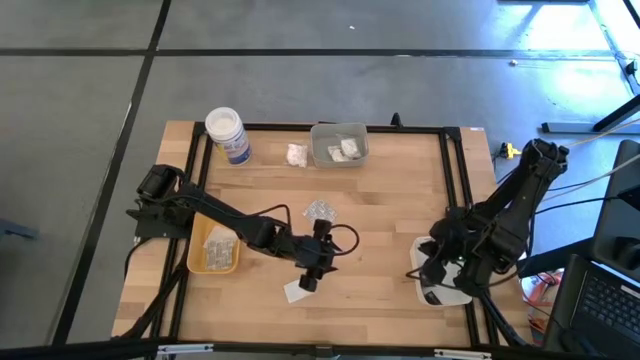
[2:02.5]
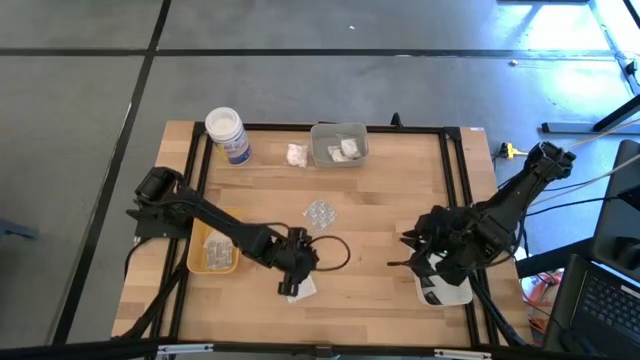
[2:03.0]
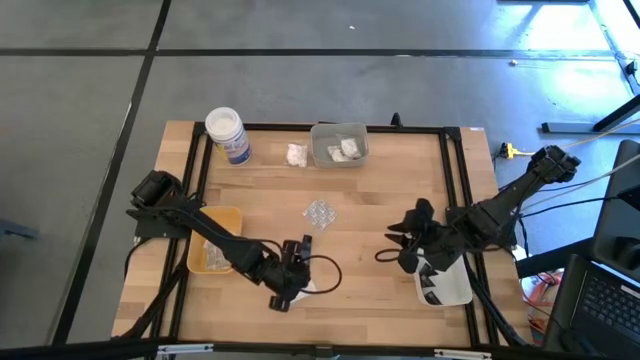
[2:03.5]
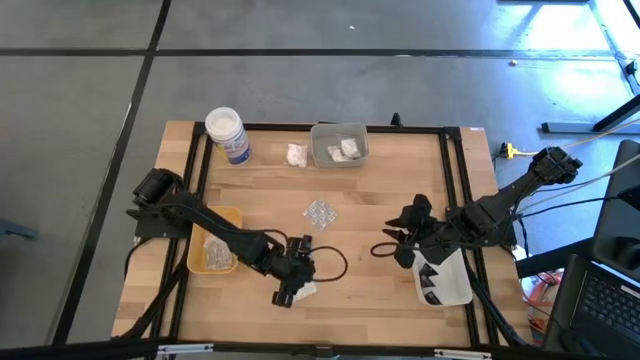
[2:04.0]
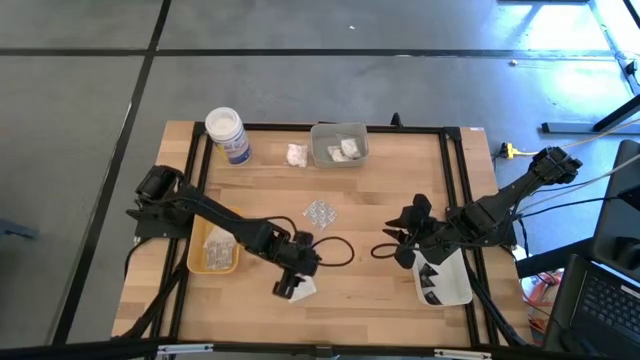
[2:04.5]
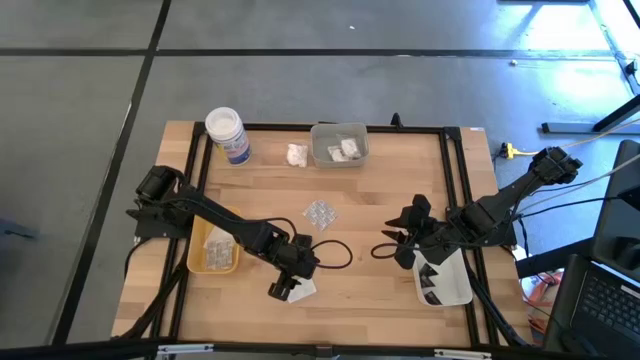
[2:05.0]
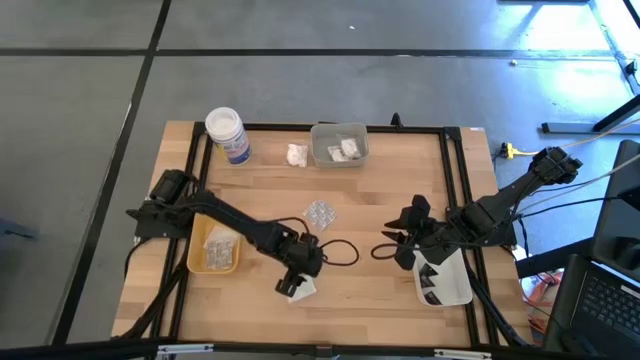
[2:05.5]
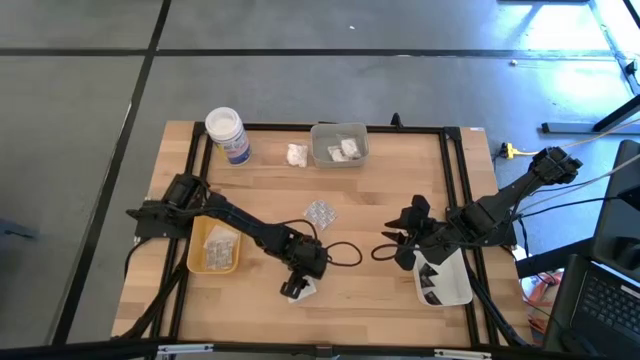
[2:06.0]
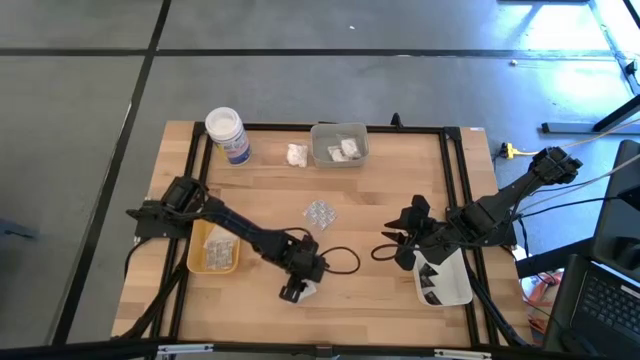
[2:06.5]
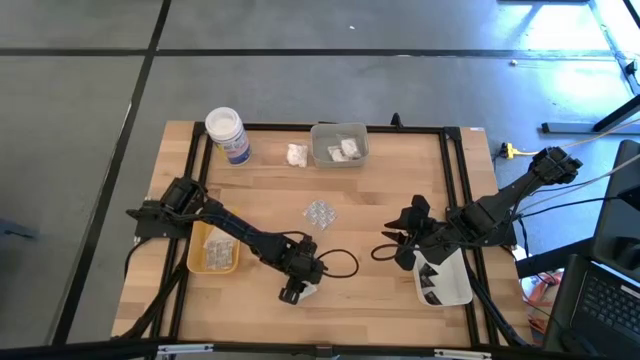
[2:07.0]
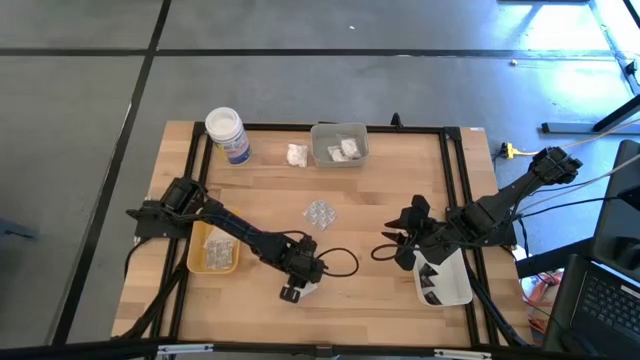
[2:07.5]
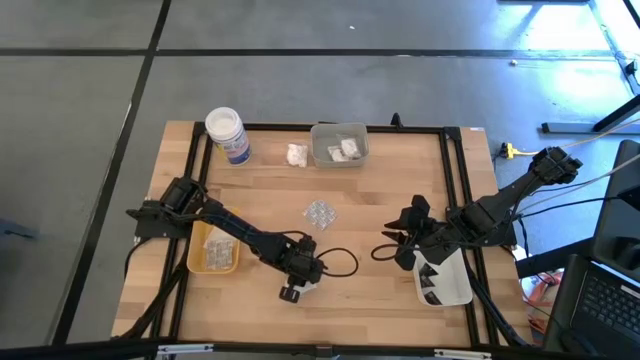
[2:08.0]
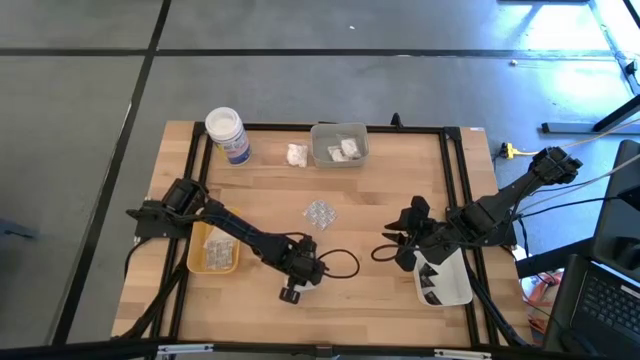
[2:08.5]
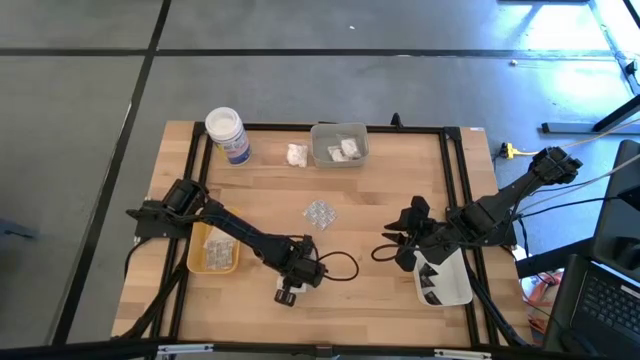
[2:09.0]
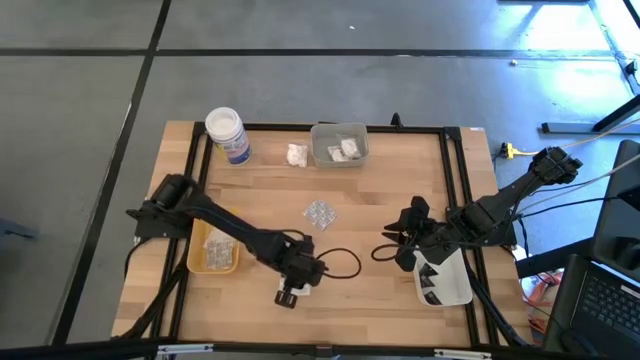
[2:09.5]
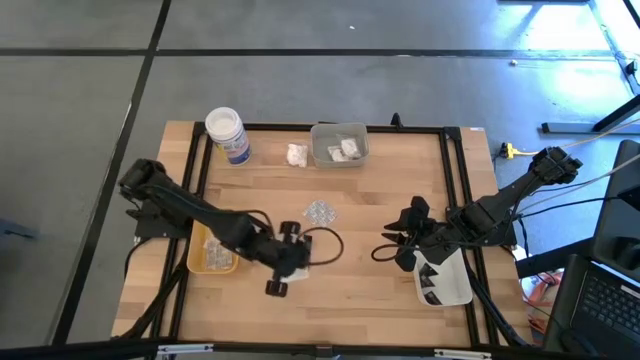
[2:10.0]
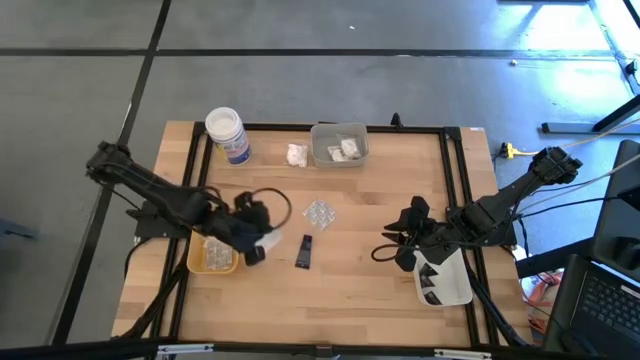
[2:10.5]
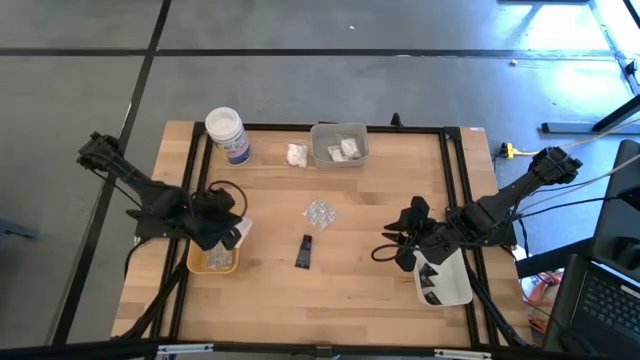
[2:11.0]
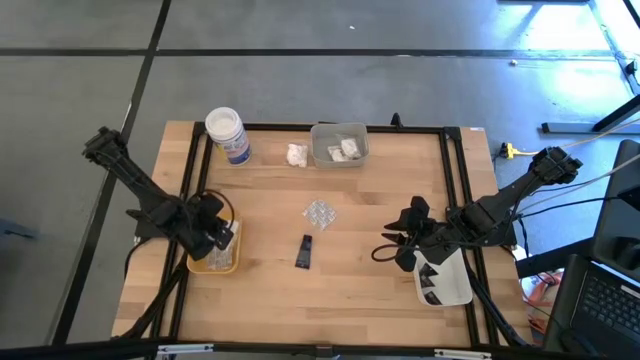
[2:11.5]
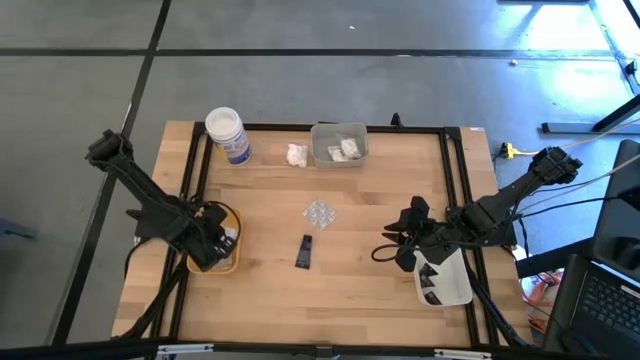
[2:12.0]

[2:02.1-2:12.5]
Task: Pick & Place Travel size toiletries
Put the white bandage pack into the yellow bin

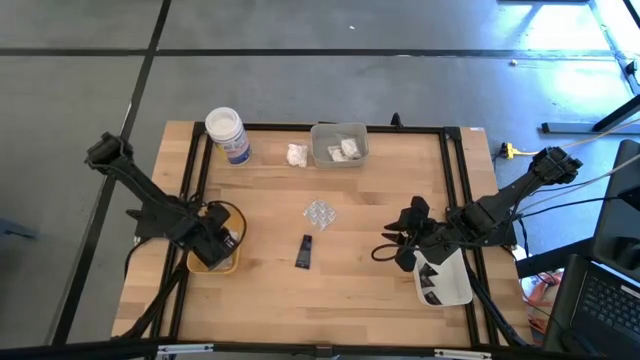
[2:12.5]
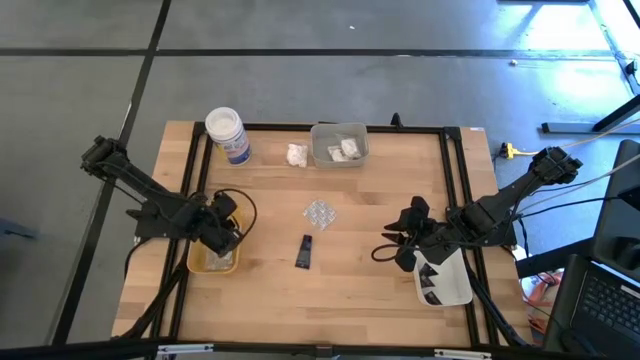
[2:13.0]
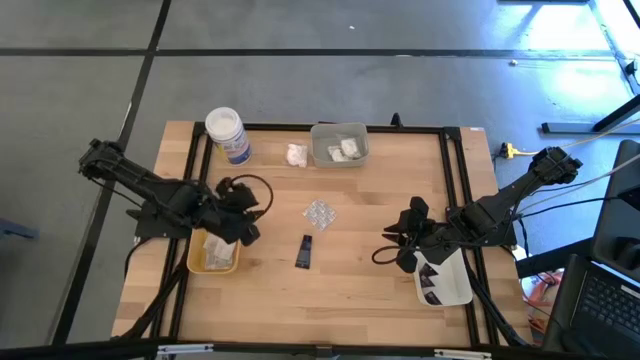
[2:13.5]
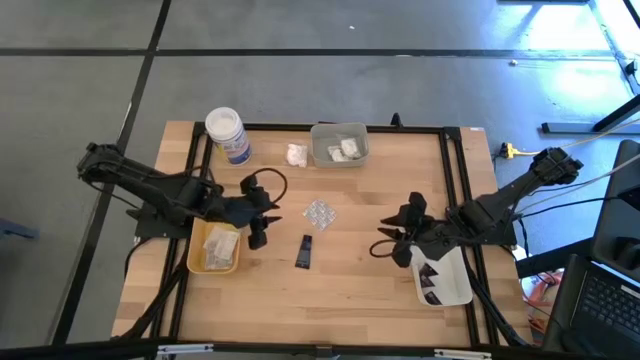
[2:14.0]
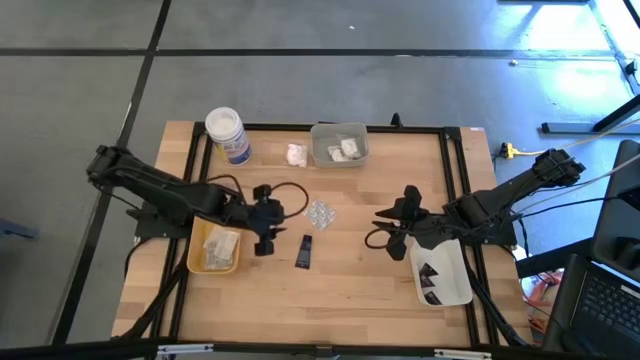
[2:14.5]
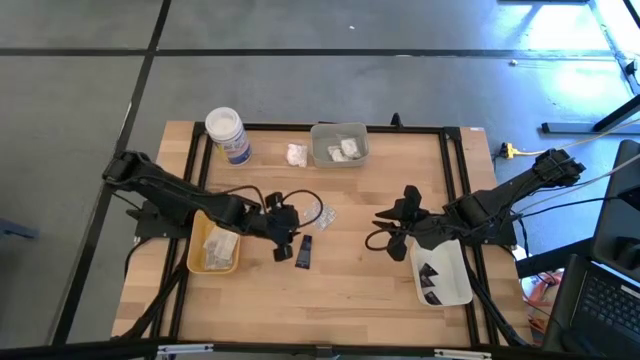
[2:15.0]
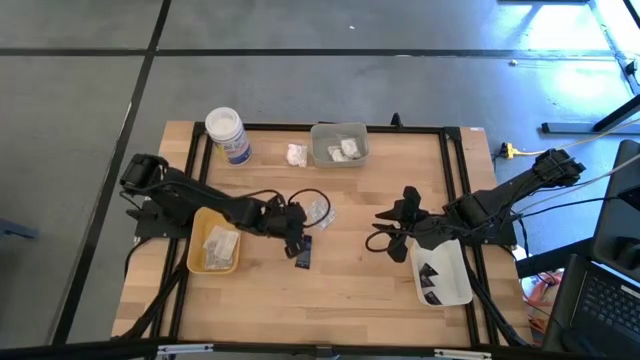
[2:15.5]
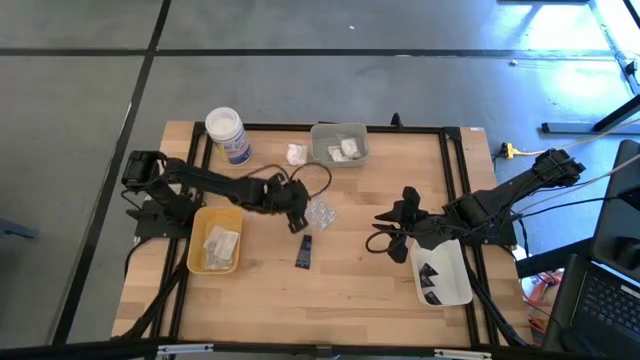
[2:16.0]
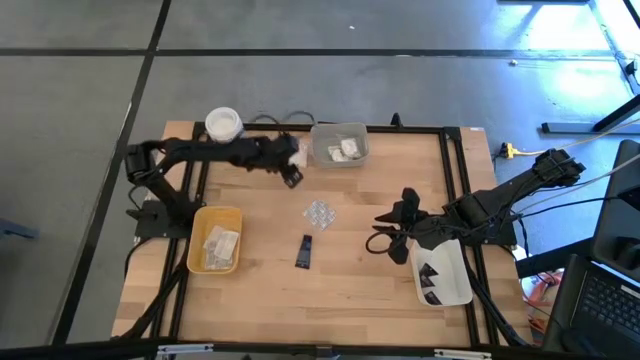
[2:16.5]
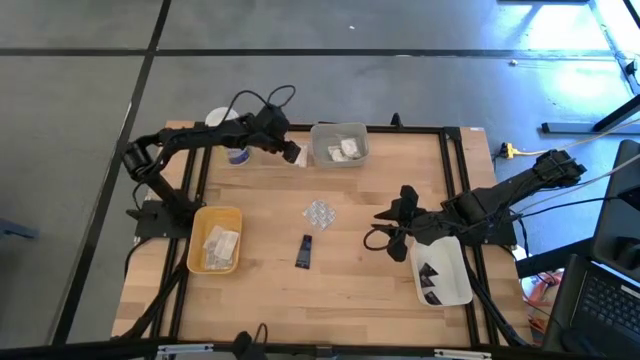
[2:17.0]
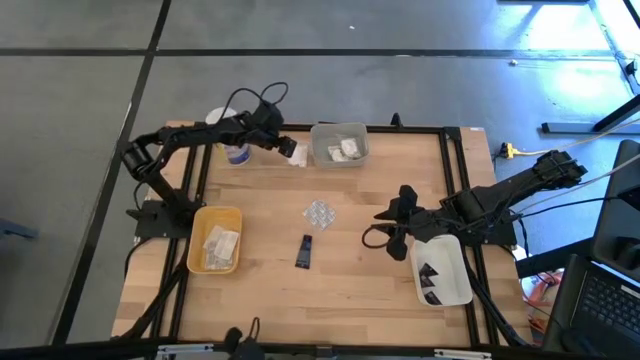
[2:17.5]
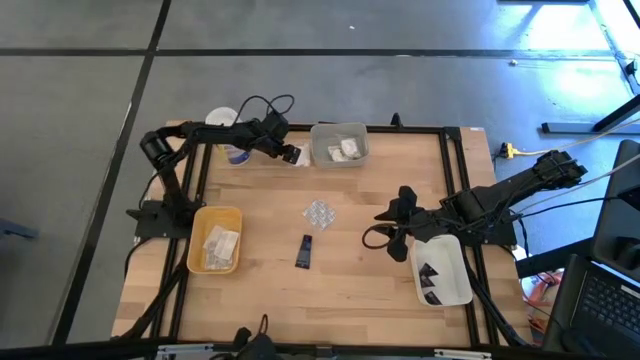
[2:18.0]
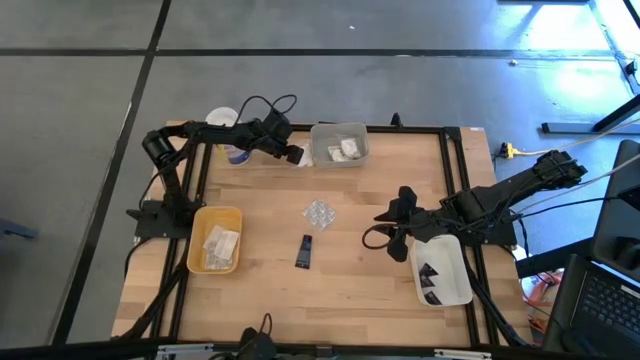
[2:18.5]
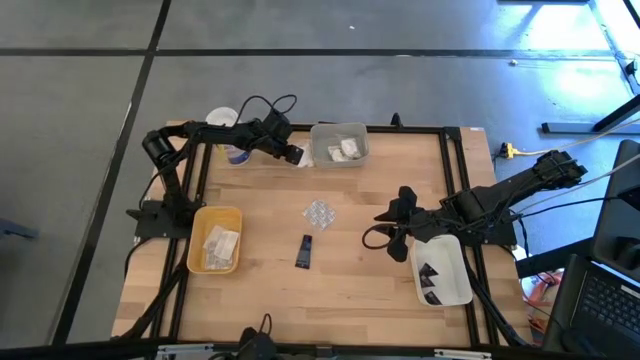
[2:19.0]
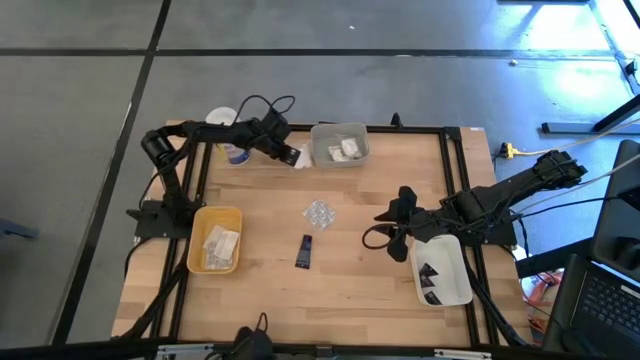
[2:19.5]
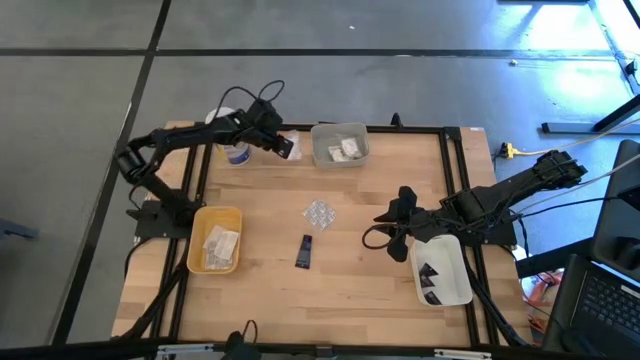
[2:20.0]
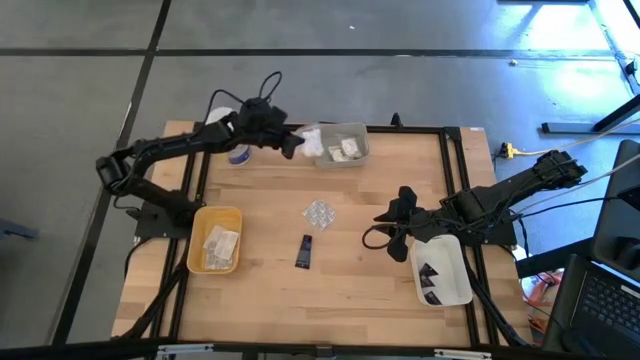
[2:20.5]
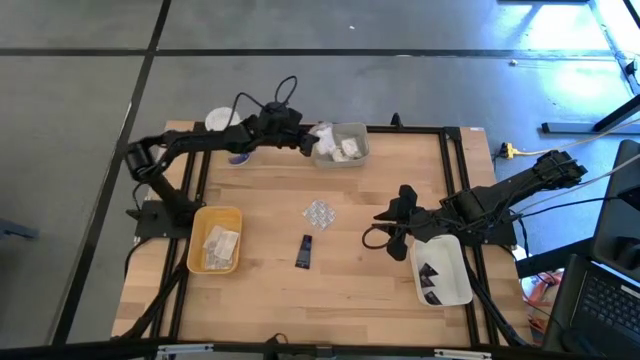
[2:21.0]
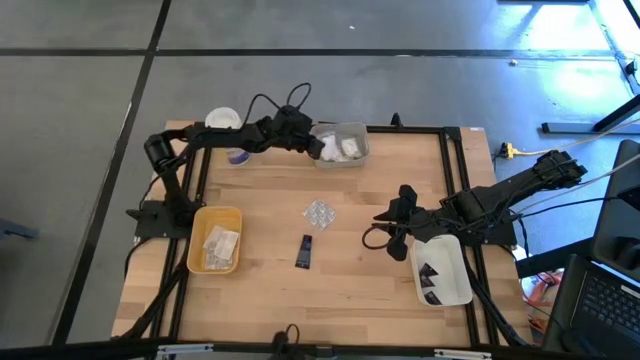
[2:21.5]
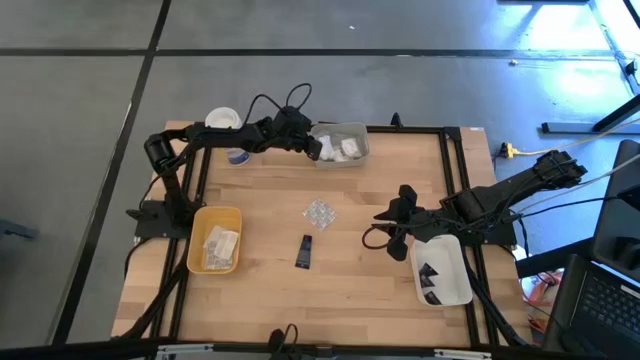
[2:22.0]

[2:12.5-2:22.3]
Put the white cotton pack into the gray bin

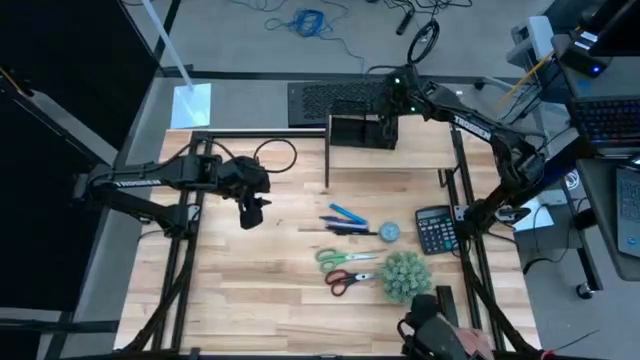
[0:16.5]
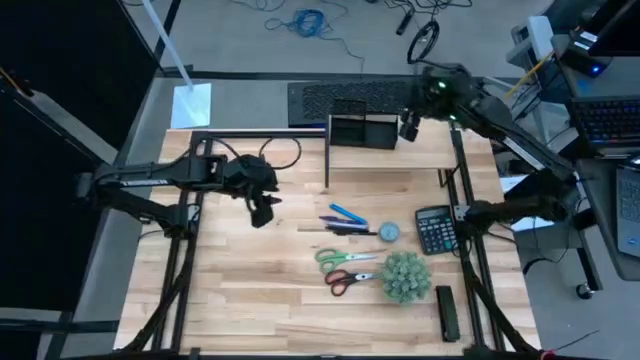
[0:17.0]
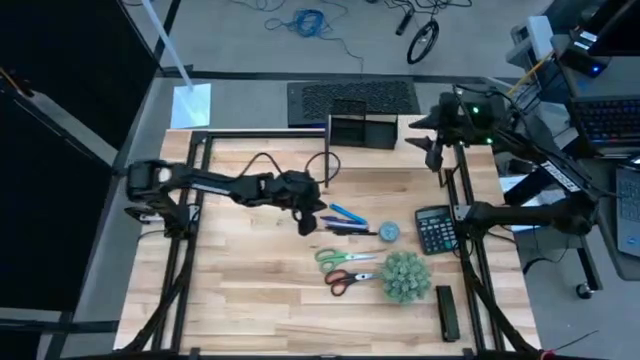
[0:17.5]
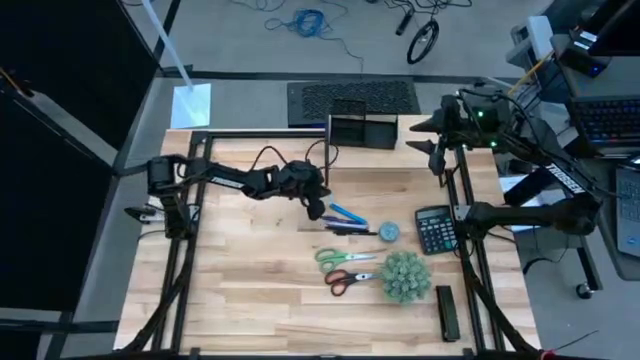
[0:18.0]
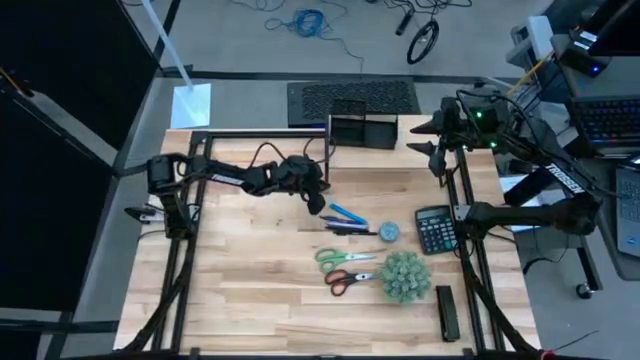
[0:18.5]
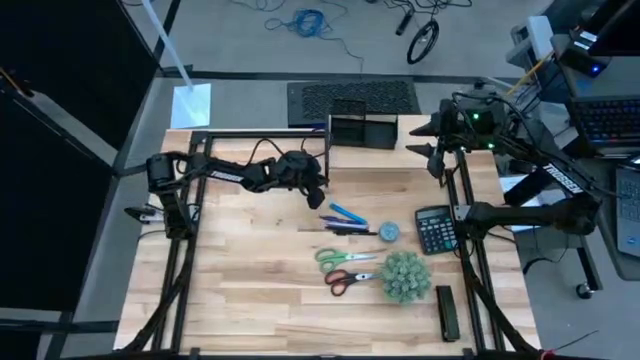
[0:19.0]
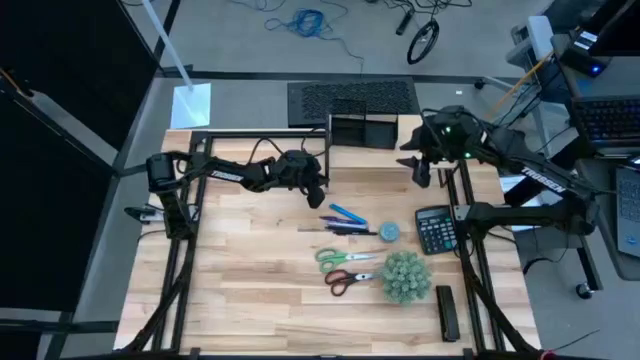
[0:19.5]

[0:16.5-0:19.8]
Task: Pick and place office supplies into organizer
Adjust the wooden shelf
